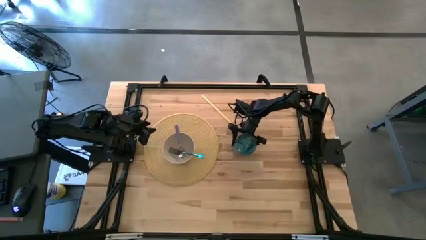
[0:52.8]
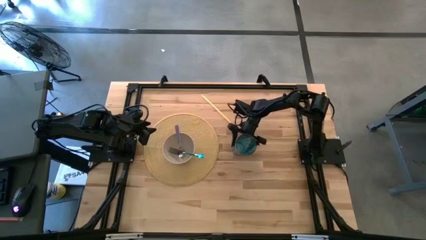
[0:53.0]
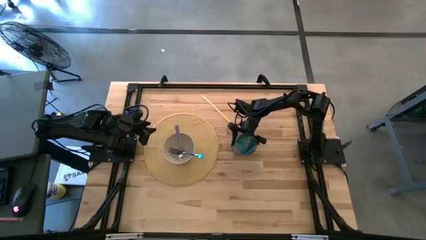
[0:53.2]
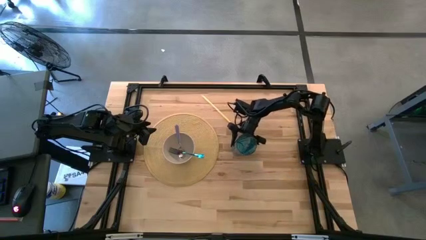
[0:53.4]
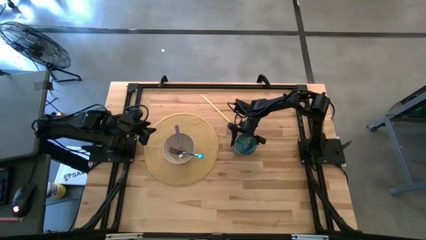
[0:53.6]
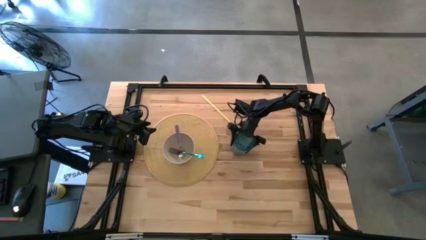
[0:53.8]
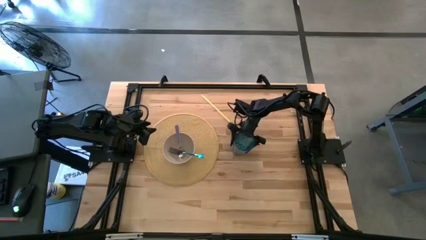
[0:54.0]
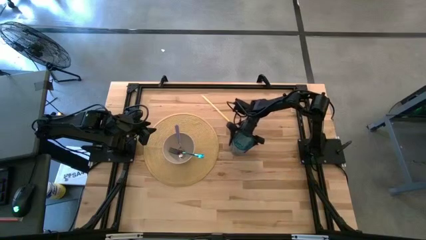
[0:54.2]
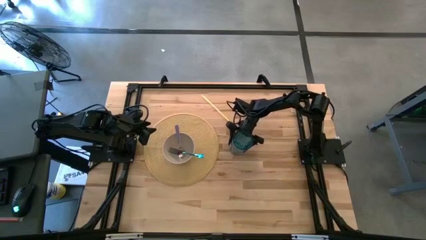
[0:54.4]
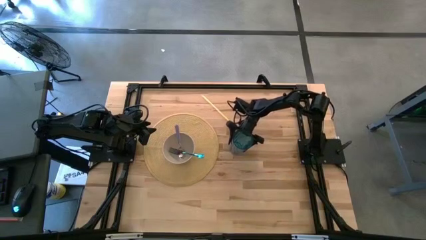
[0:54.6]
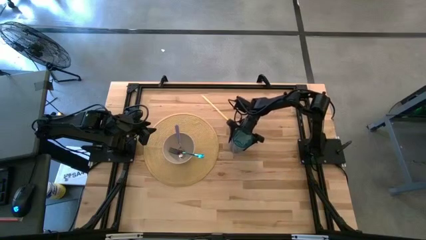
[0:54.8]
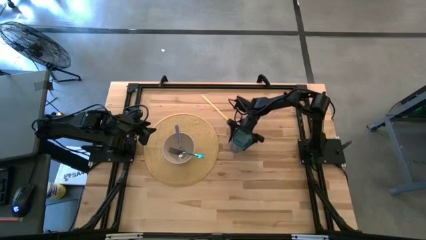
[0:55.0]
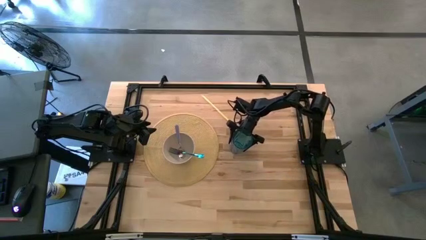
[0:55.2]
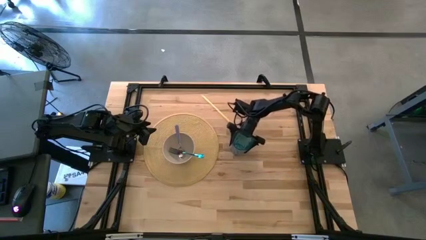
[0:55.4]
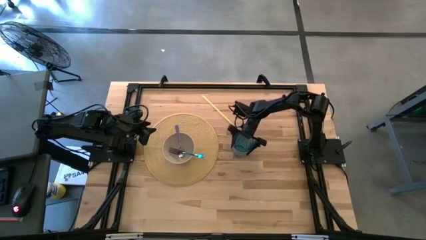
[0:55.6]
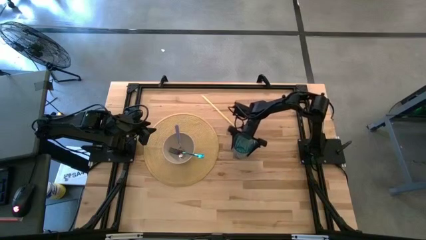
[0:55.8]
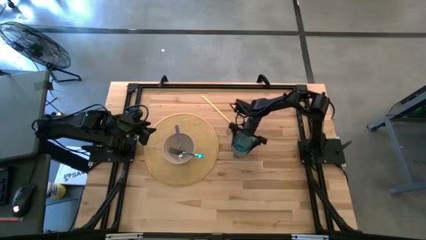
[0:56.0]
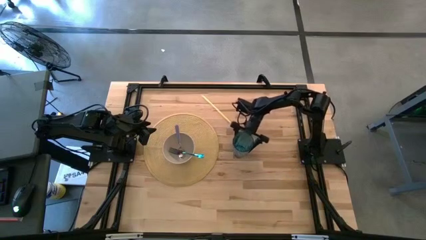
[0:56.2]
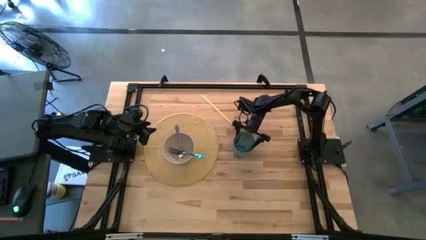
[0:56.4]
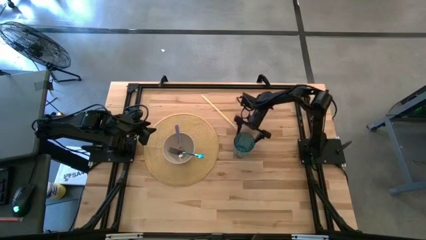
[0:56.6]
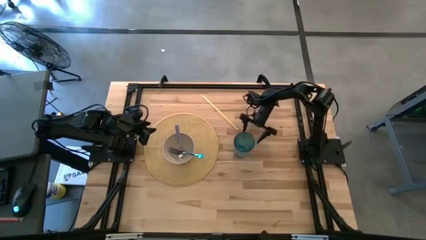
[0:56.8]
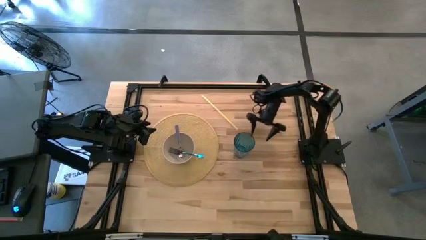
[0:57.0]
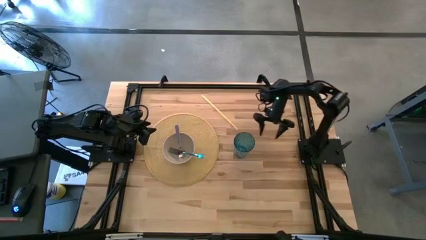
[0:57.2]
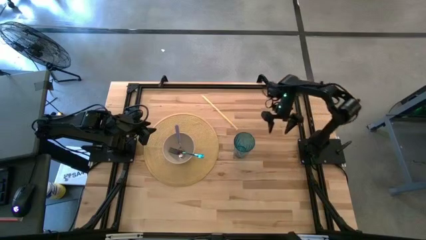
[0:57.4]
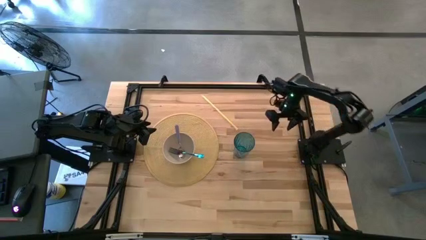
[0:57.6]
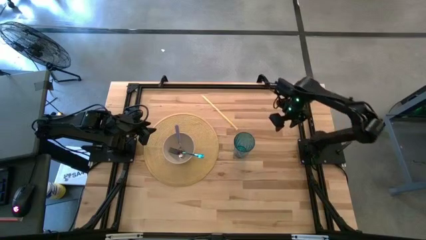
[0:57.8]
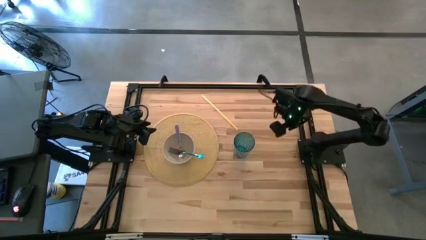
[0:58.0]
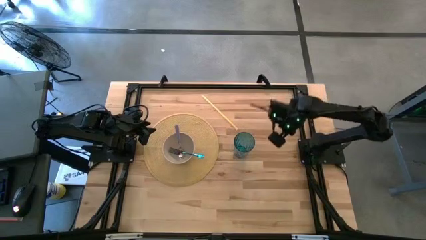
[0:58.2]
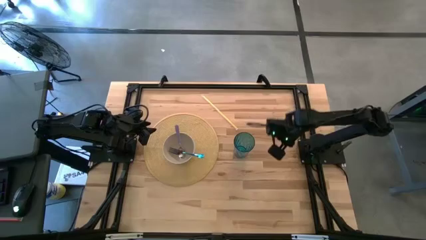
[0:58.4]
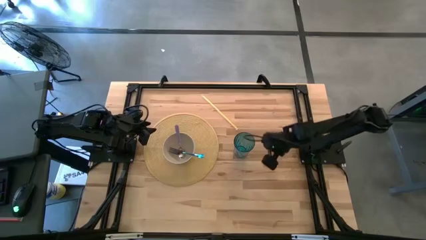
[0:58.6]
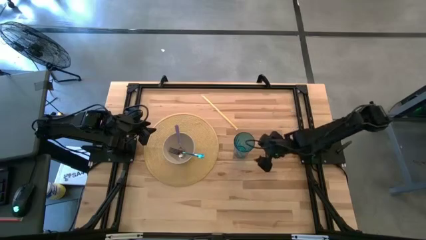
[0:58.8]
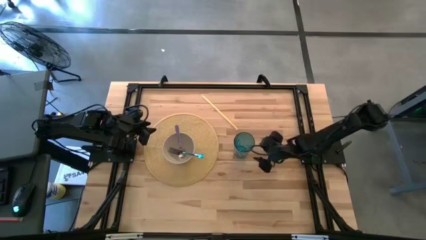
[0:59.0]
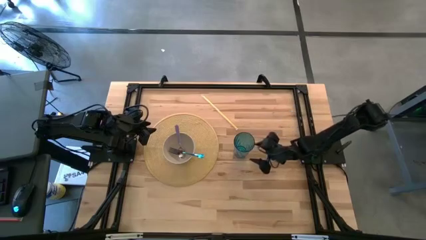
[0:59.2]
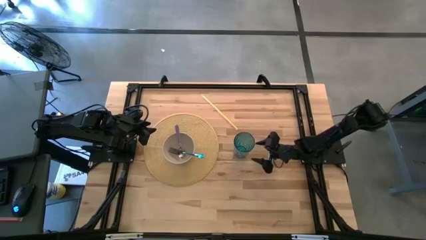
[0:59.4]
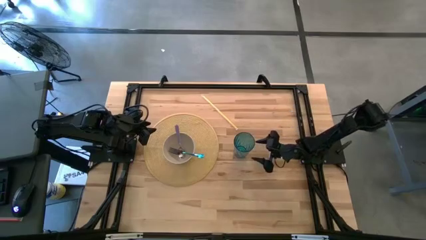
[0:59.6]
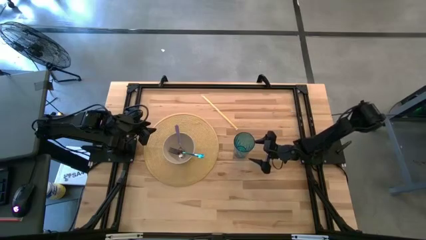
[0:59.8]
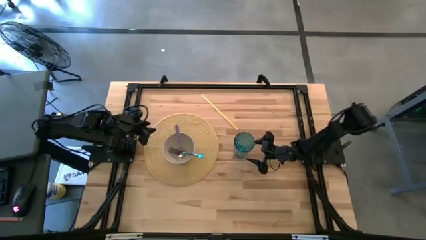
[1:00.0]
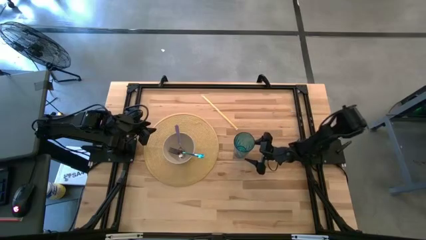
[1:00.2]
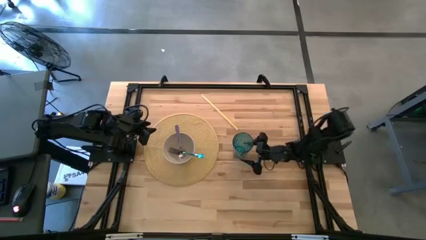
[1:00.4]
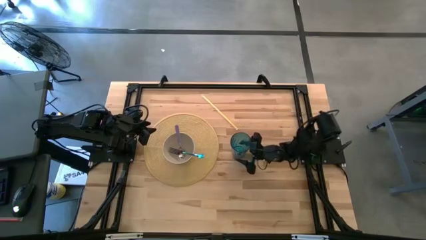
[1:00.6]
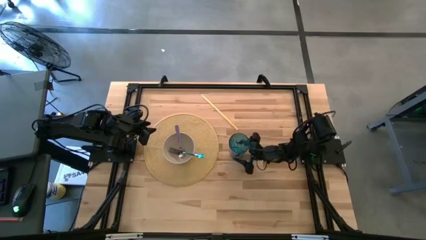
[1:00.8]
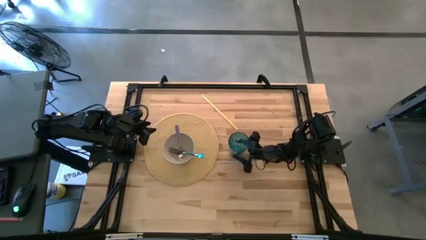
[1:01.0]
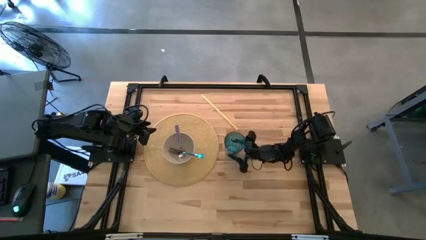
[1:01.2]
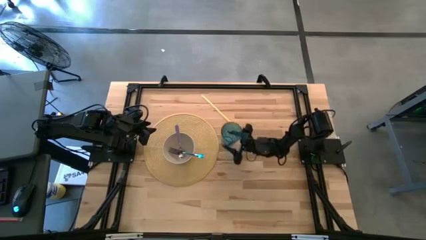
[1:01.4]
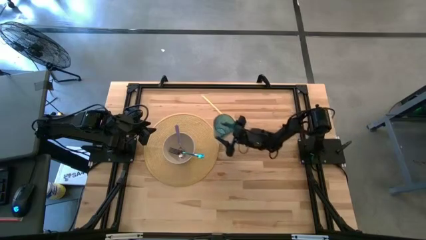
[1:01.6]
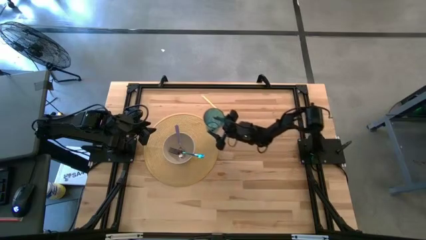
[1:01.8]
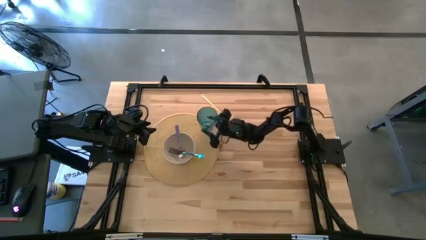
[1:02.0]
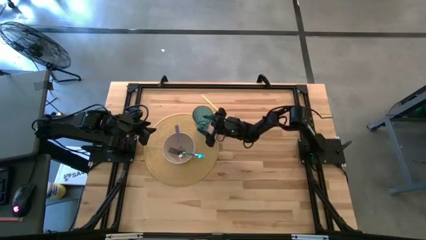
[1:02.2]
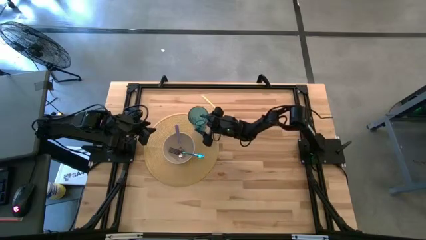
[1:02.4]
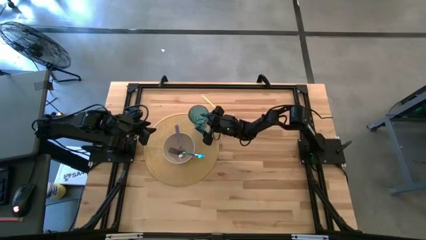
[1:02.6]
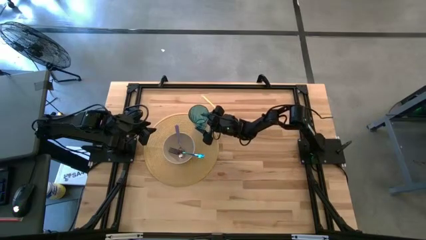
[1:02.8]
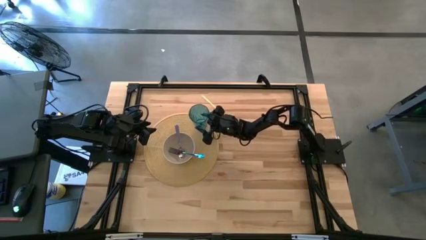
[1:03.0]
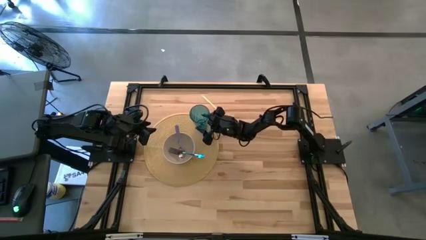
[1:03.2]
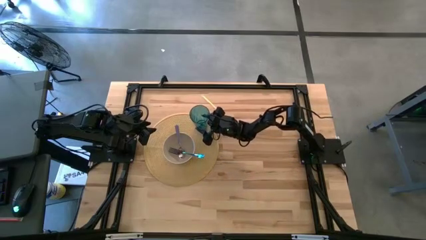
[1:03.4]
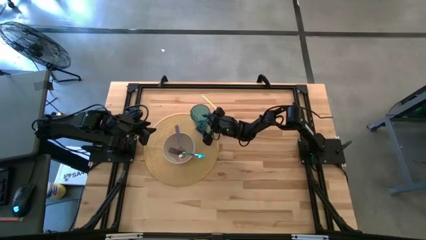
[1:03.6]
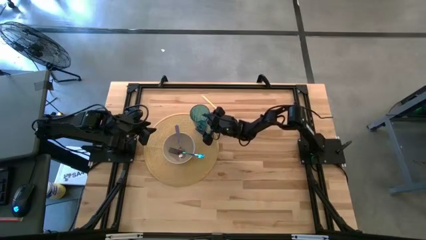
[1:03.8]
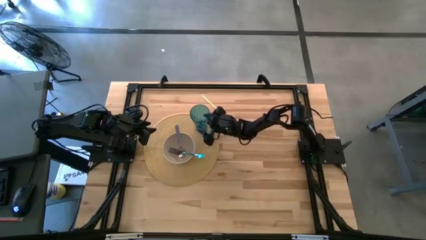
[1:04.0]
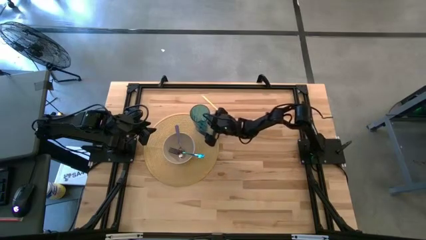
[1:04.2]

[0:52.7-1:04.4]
Task: Pick & Place Utensil
Put the blue cup on the yellow mat to the top right of the white bowl

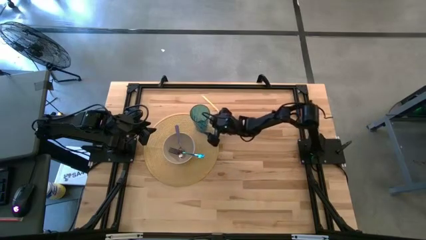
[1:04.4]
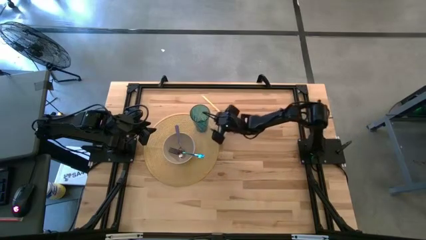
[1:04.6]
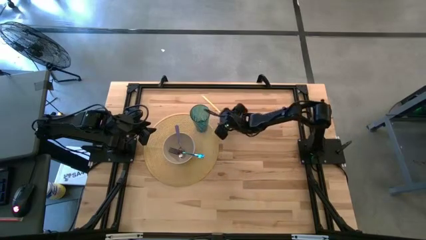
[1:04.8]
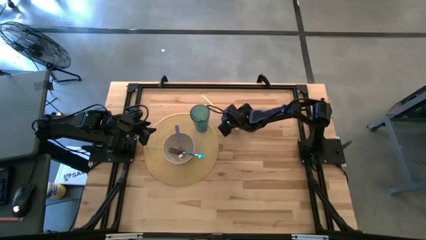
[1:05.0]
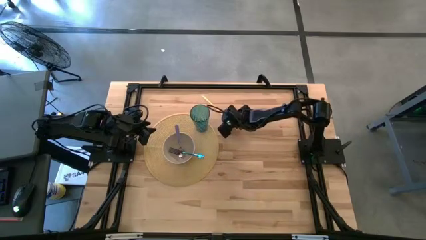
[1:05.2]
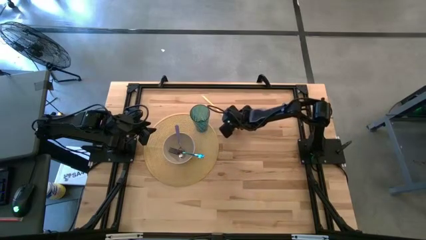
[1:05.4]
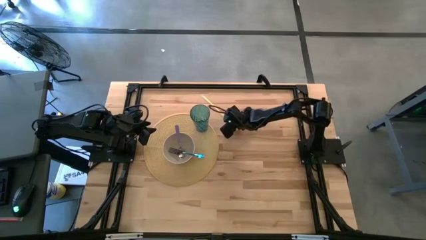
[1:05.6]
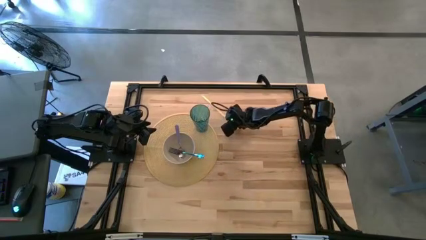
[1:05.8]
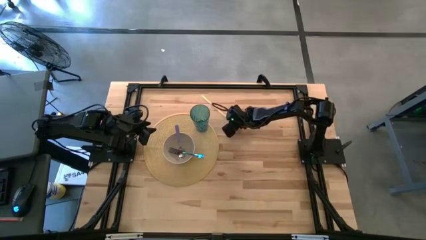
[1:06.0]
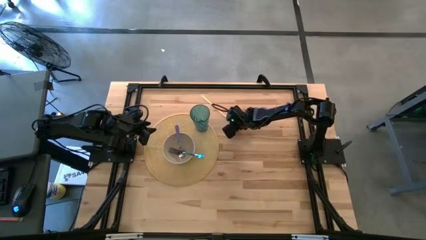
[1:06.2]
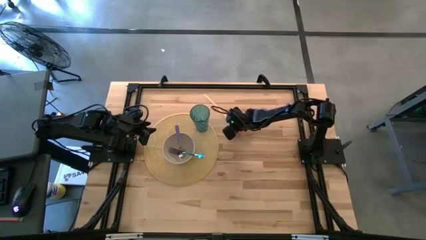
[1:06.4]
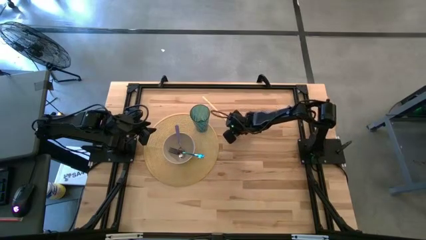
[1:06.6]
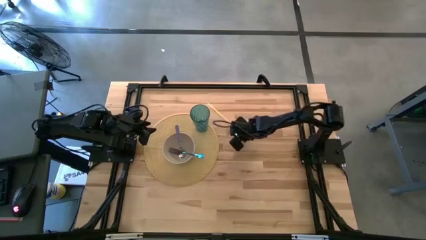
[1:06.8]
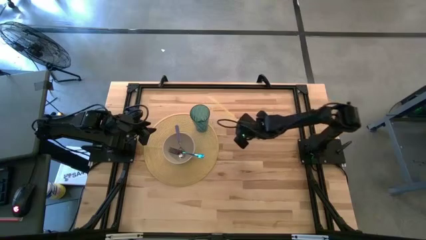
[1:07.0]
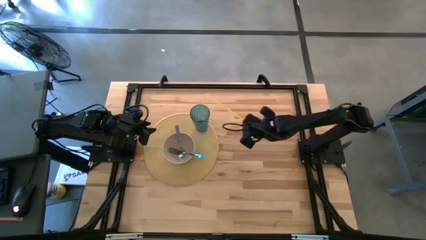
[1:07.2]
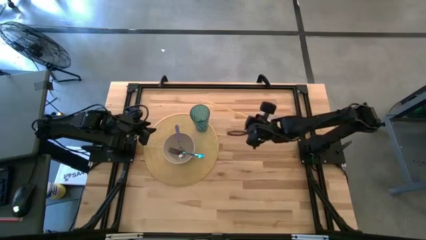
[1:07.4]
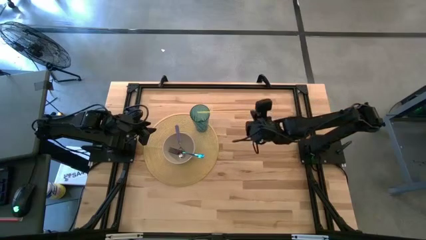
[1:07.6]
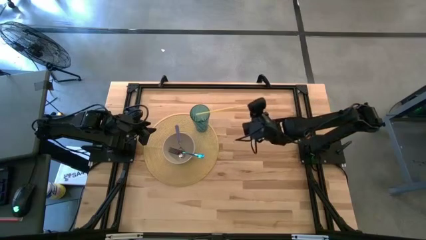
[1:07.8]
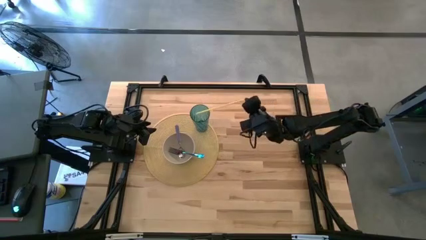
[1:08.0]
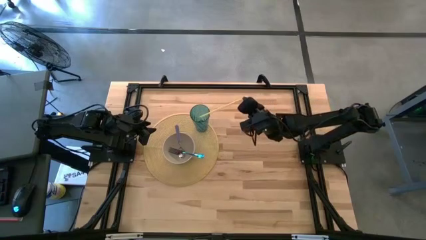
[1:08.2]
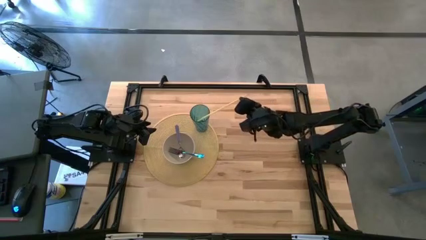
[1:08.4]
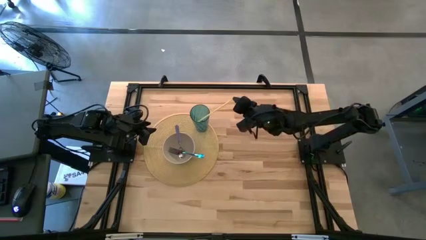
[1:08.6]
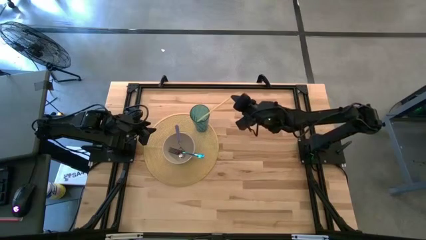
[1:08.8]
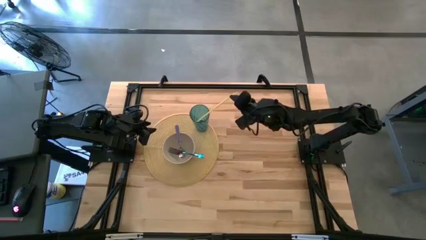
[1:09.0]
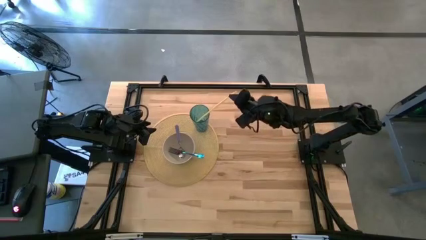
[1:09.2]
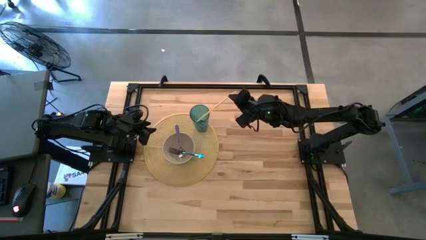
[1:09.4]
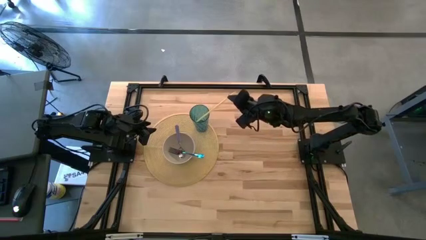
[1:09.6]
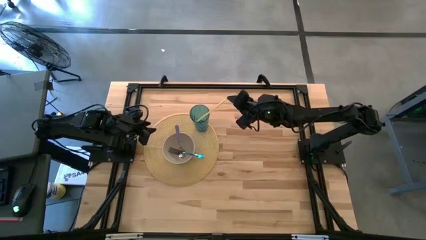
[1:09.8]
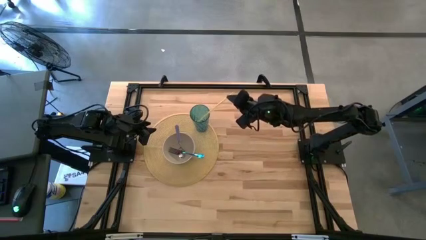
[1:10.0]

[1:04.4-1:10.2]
Put the yellow straw into the blue cup
